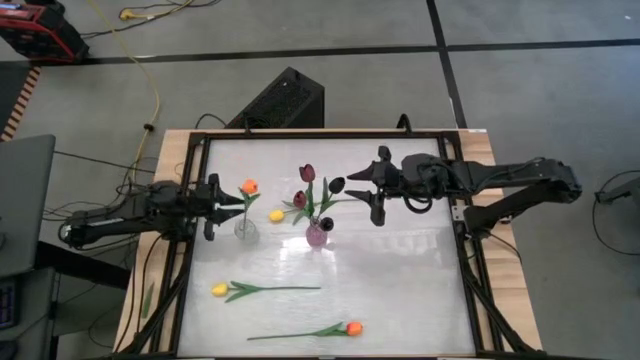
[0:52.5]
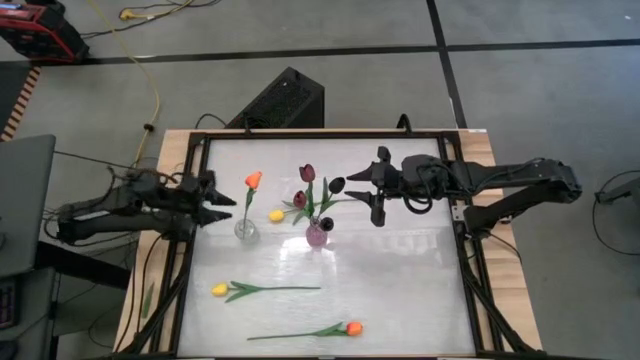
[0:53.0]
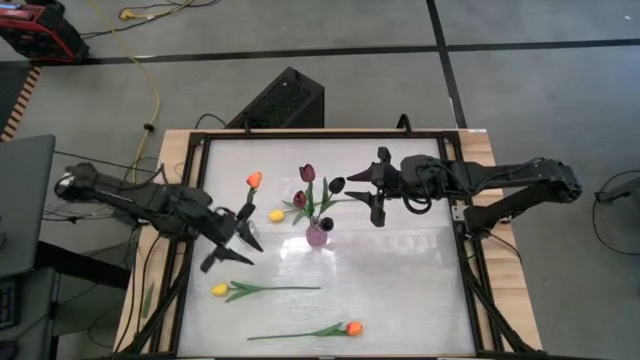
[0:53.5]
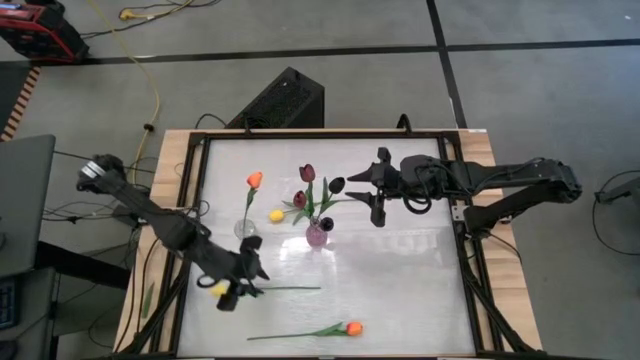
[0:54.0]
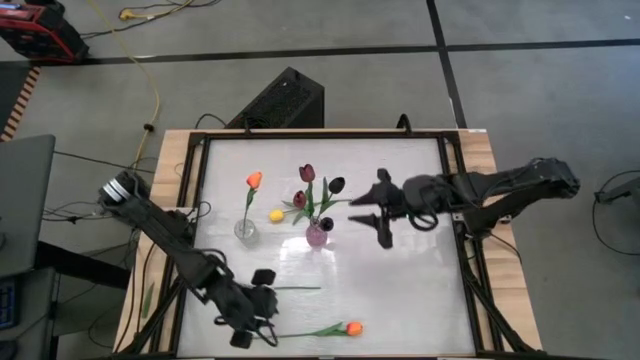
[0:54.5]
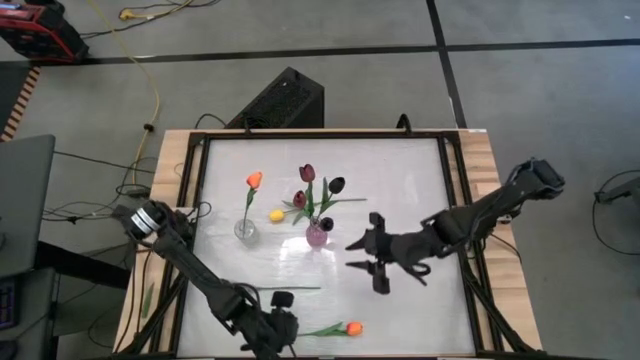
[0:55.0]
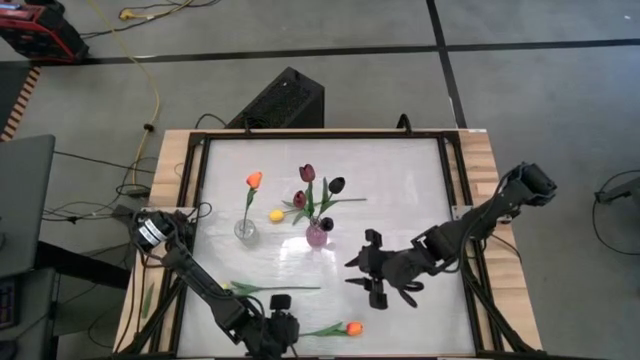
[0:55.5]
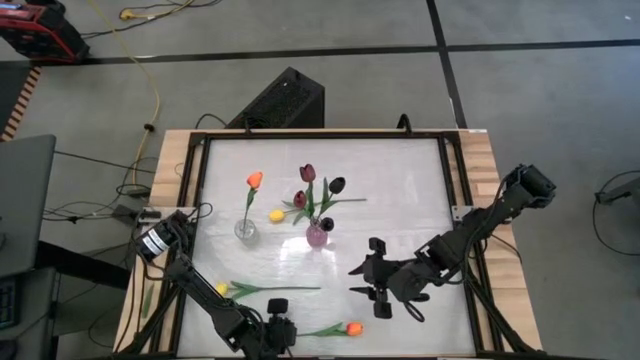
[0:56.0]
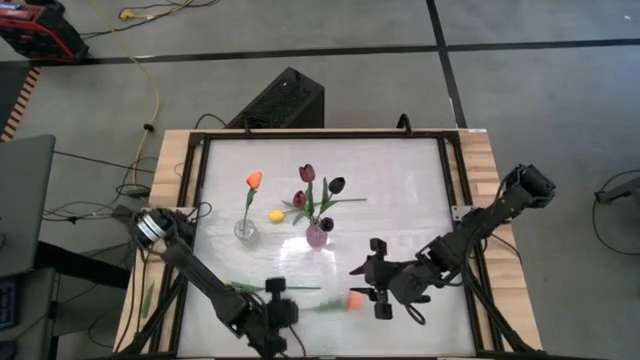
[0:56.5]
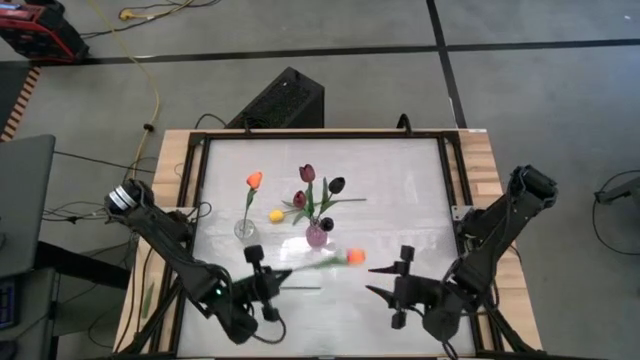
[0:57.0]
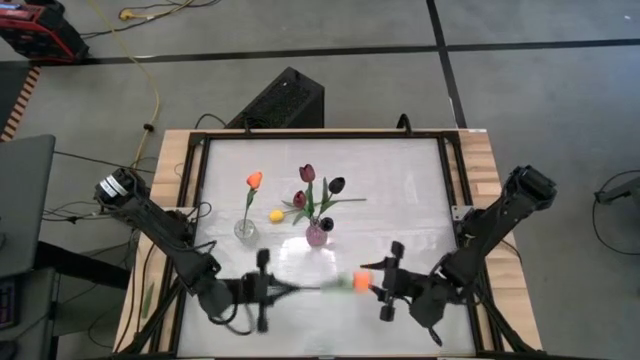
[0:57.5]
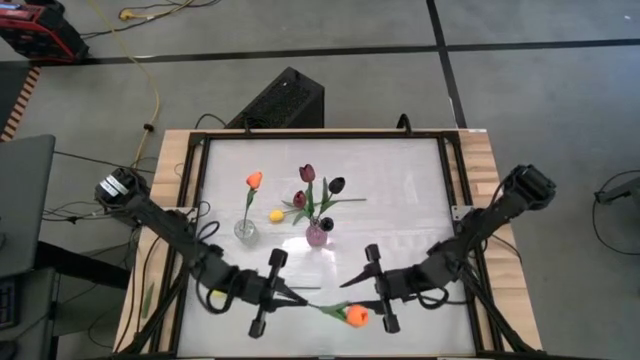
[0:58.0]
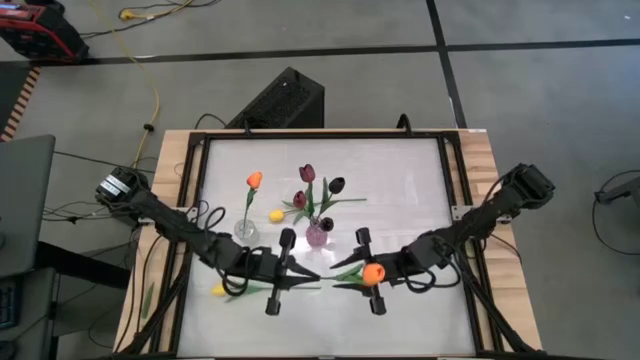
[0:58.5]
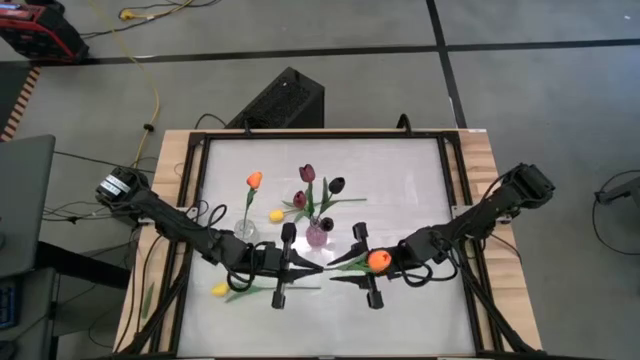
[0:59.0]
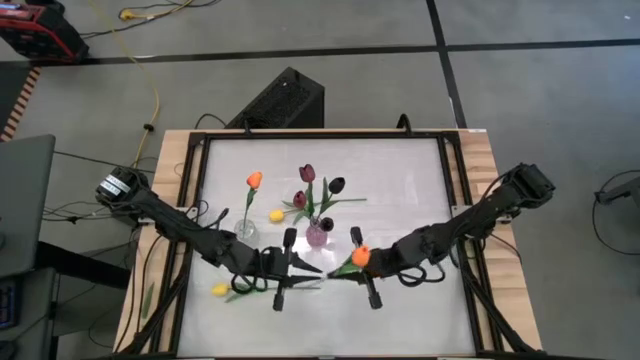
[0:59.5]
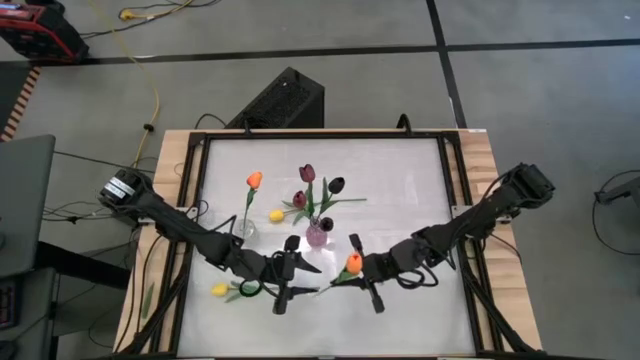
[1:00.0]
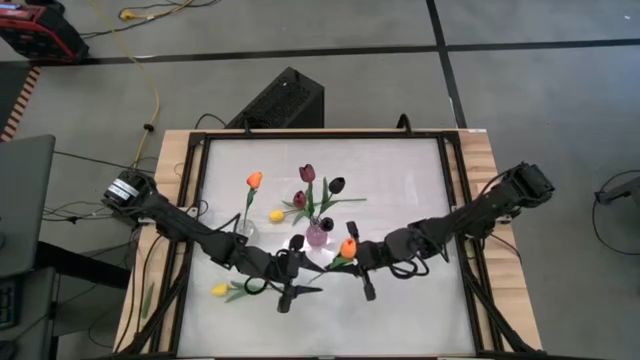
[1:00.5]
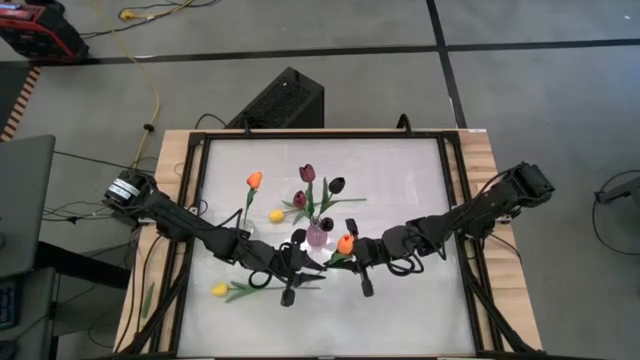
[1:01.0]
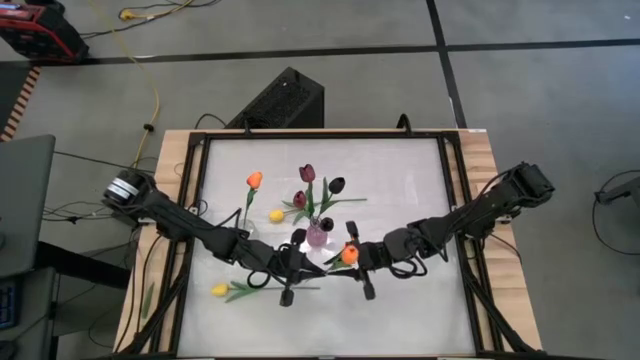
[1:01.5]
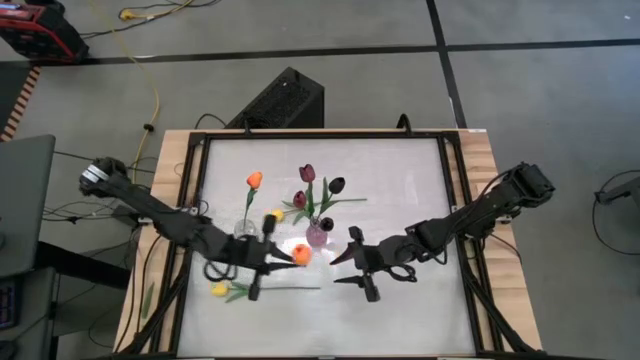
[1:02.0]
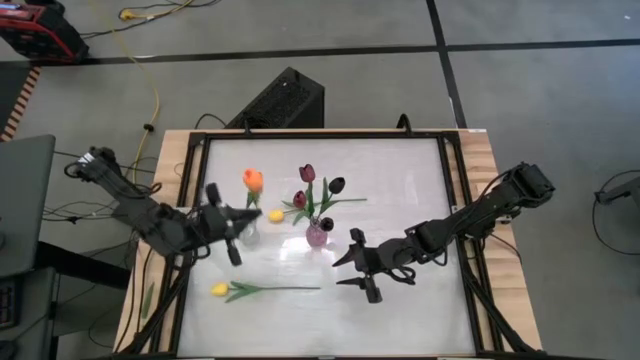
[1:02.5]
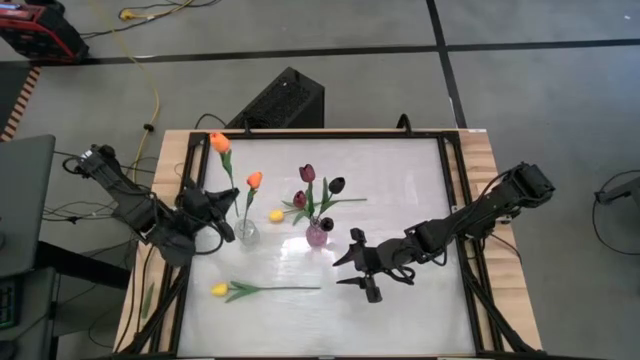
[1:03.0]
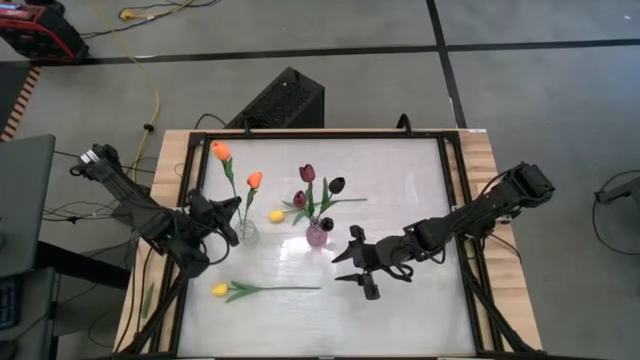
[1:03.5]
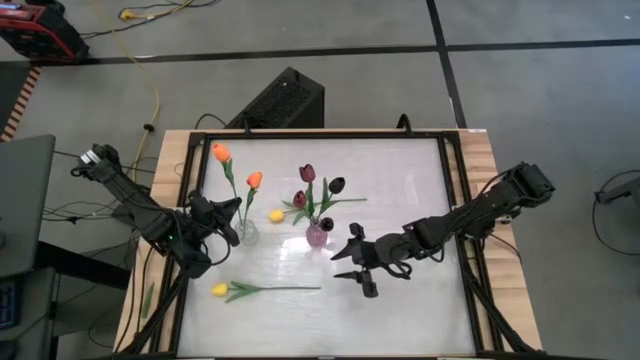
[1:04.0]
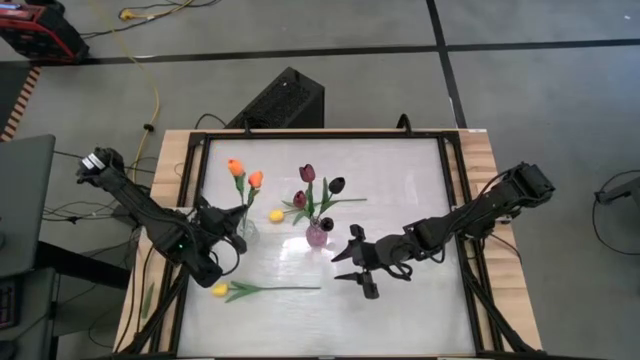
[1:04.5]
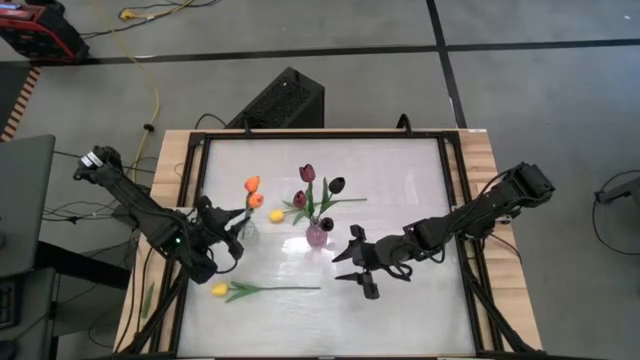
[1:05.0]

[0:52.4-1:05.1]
Task: Sort flowers into vase by color
Put the orange flower into the transparent vase

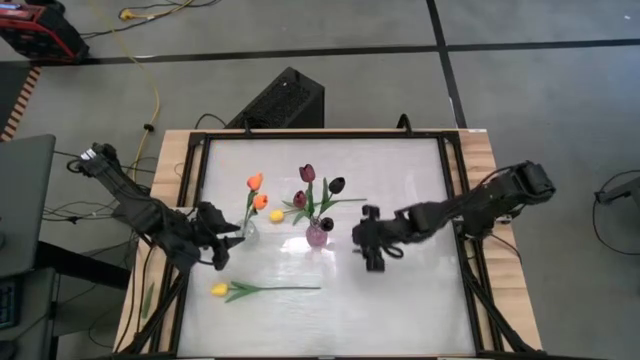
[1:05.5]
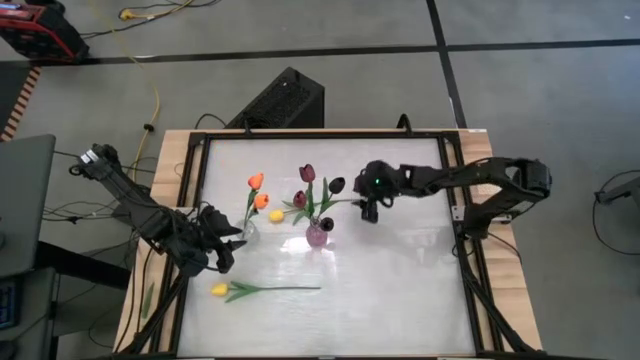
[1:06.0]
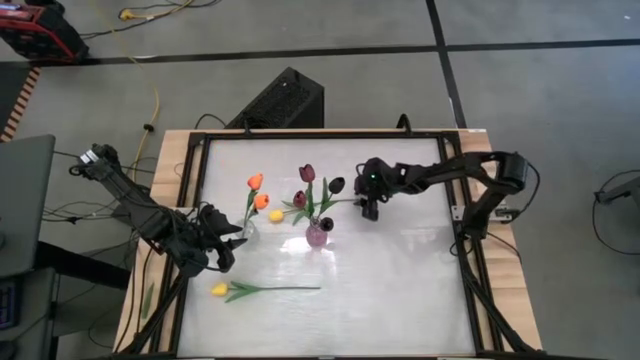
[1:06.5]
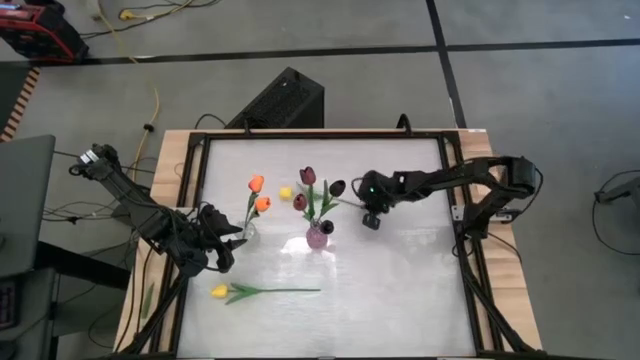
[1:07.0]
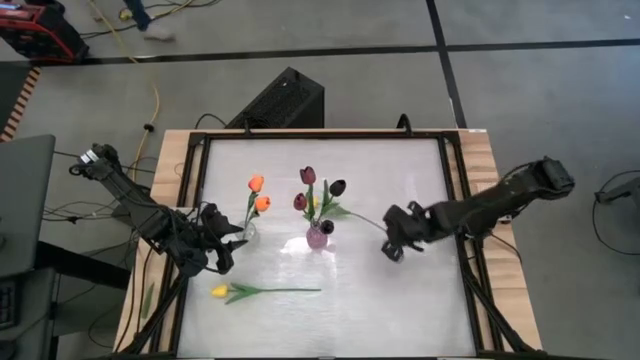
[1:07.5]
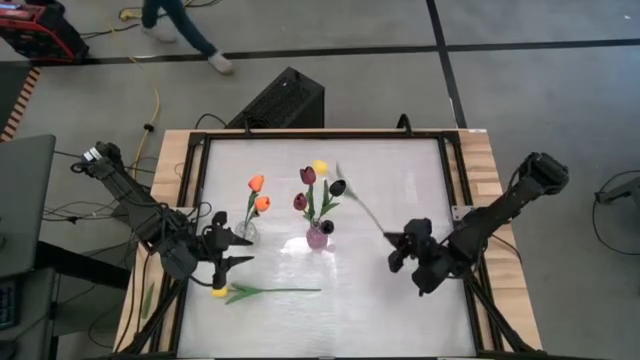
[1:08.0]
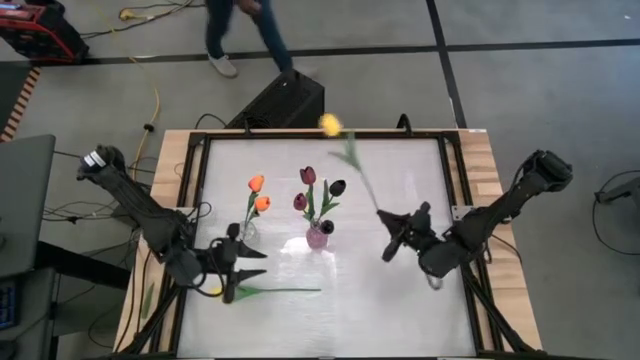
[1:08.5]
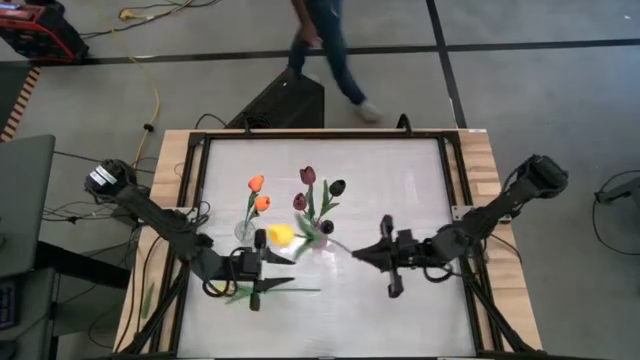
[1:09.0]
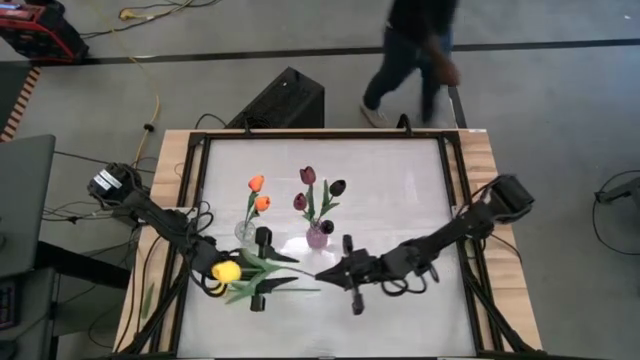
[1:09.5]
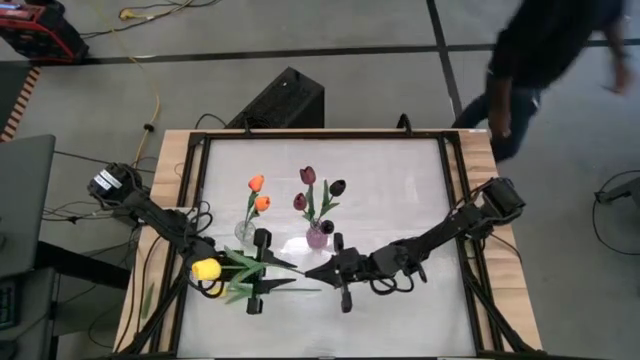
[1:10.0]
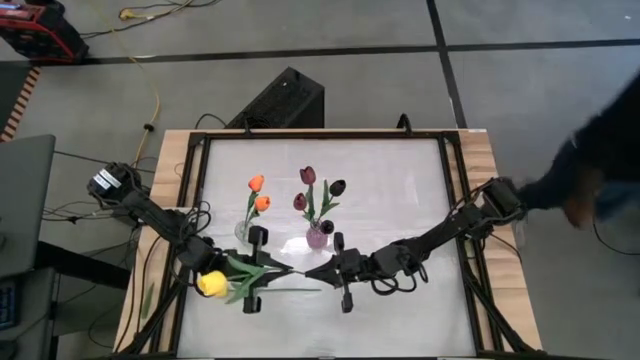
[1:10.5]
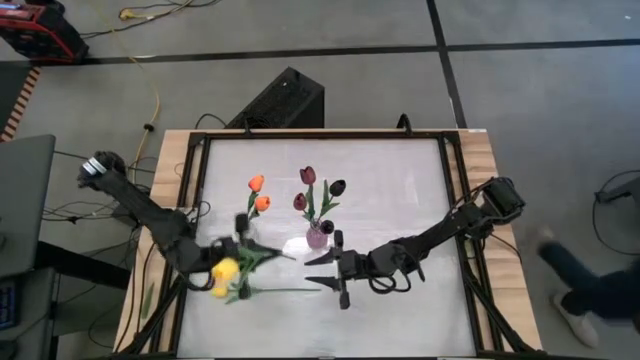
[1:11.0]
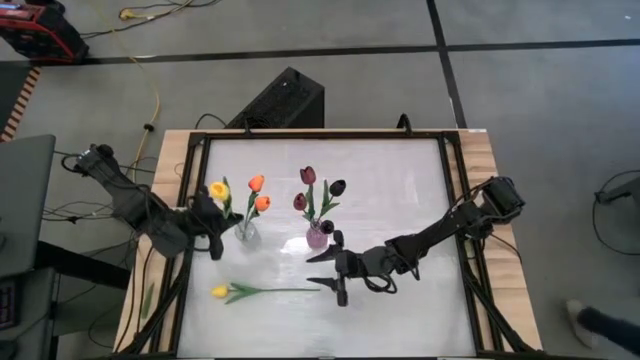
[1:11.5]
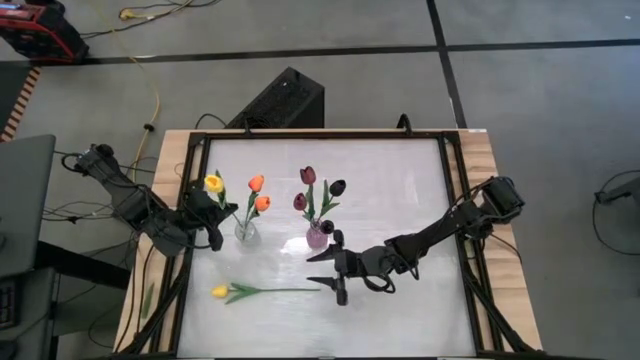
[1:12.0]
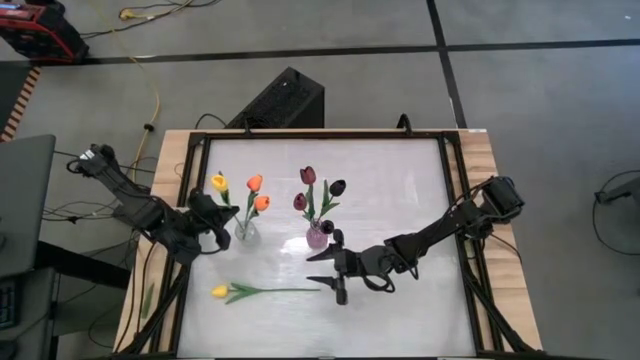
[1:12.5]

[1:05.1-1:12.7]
Put the top yellow flower into the transparent vase
